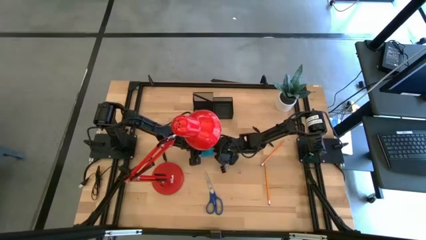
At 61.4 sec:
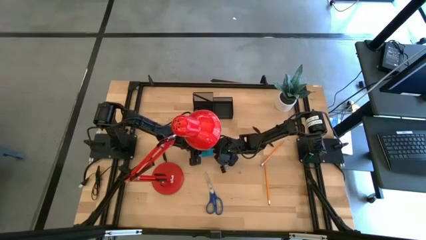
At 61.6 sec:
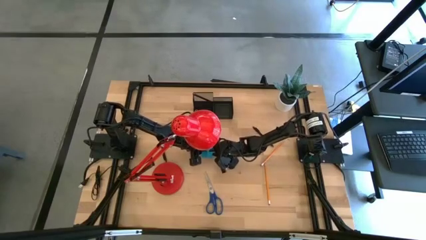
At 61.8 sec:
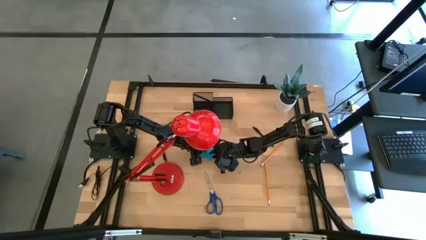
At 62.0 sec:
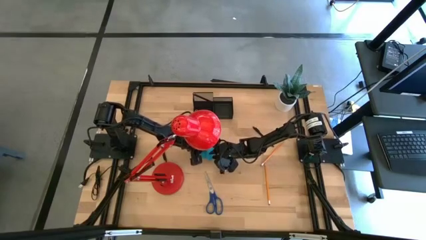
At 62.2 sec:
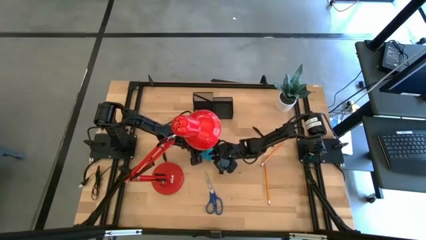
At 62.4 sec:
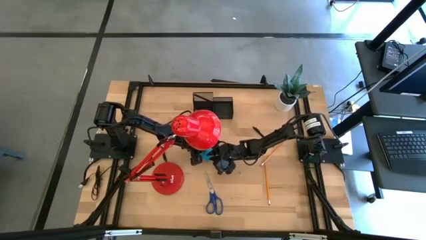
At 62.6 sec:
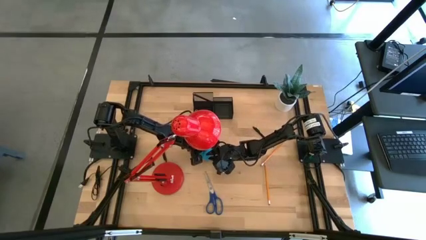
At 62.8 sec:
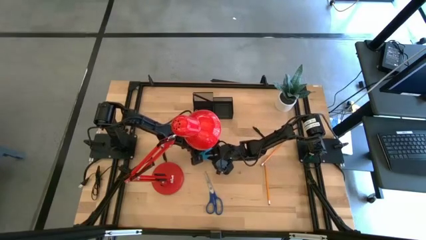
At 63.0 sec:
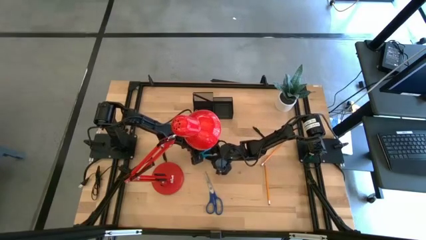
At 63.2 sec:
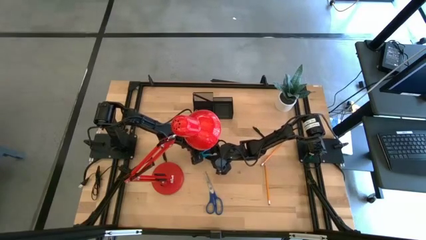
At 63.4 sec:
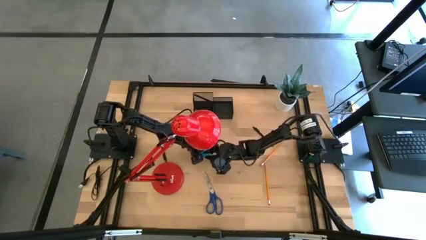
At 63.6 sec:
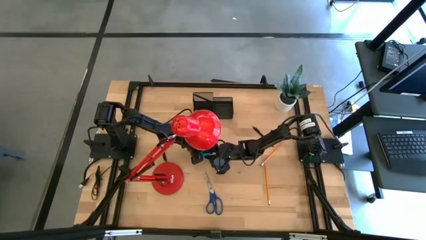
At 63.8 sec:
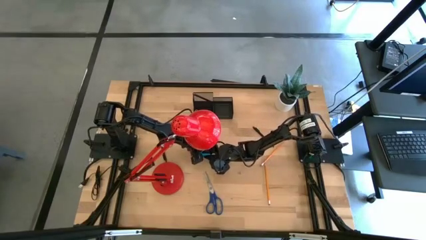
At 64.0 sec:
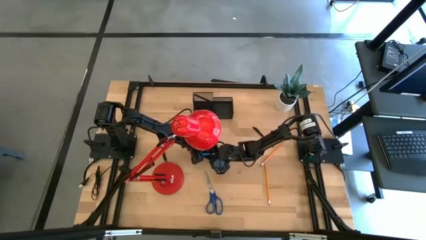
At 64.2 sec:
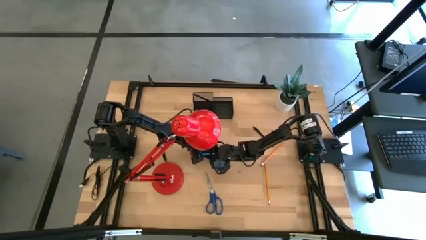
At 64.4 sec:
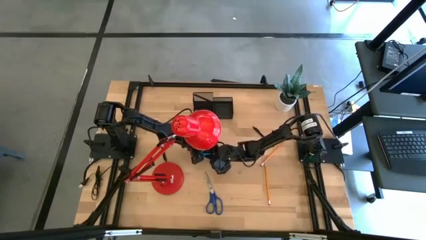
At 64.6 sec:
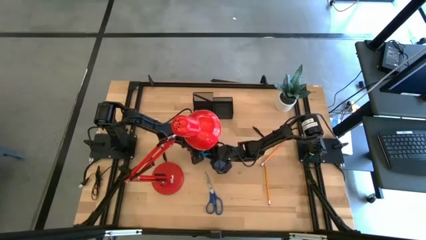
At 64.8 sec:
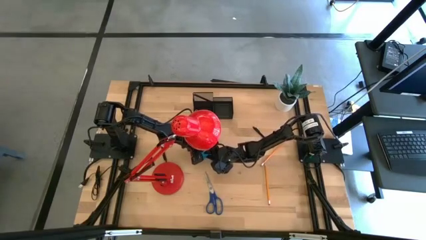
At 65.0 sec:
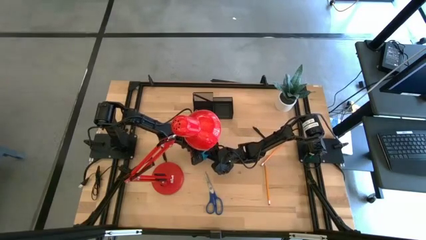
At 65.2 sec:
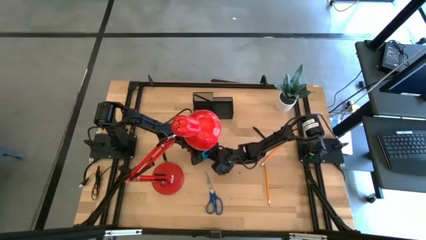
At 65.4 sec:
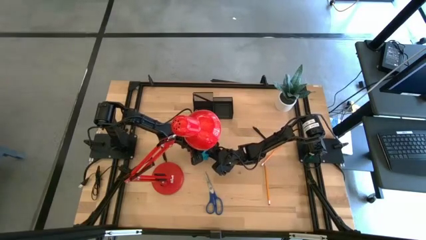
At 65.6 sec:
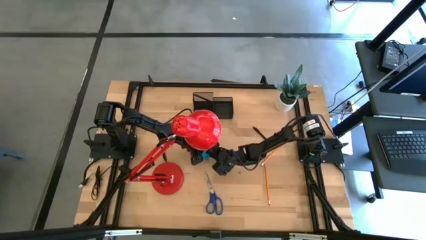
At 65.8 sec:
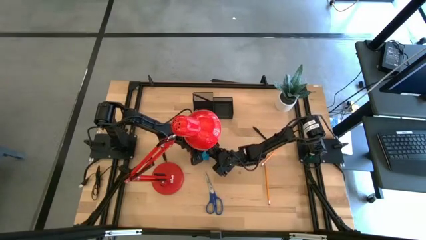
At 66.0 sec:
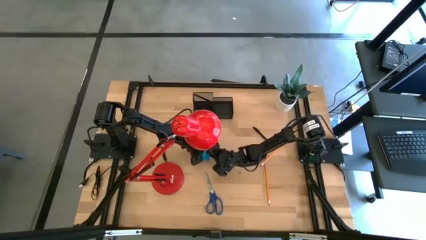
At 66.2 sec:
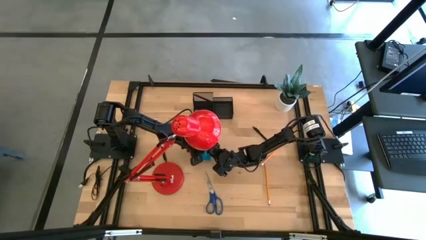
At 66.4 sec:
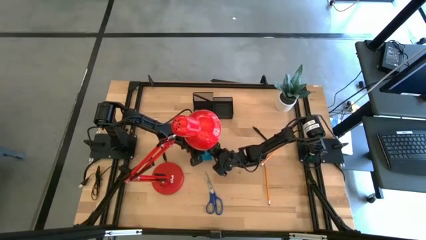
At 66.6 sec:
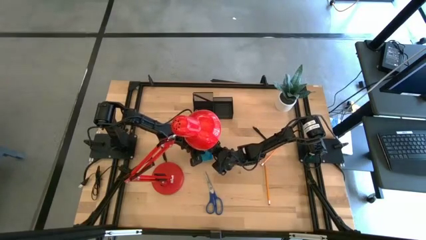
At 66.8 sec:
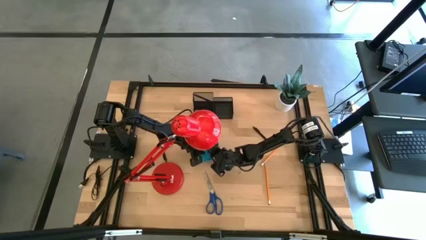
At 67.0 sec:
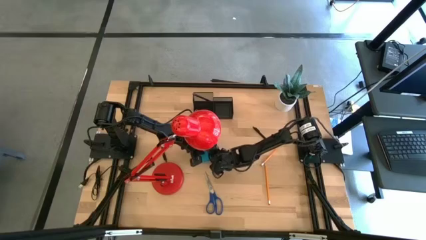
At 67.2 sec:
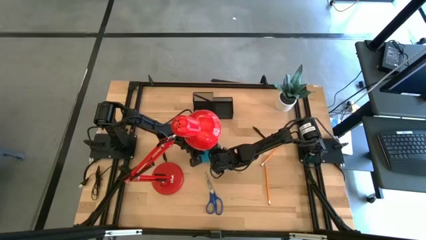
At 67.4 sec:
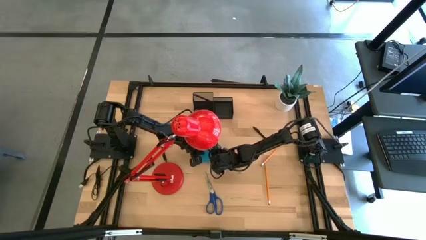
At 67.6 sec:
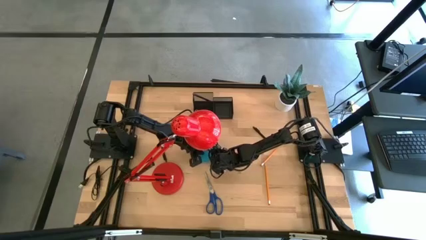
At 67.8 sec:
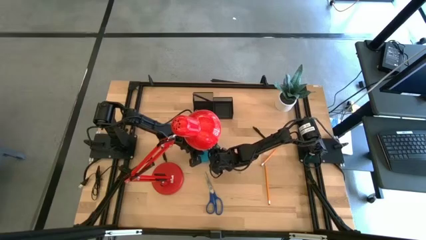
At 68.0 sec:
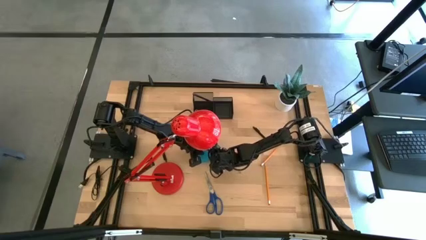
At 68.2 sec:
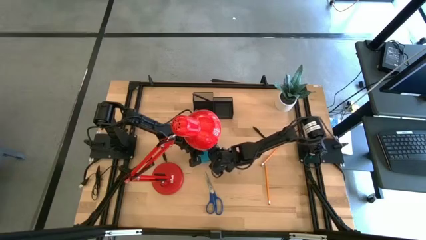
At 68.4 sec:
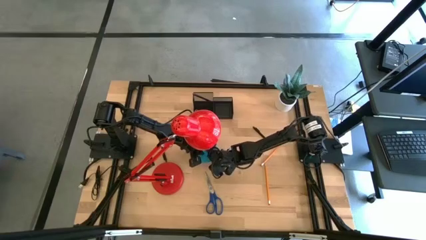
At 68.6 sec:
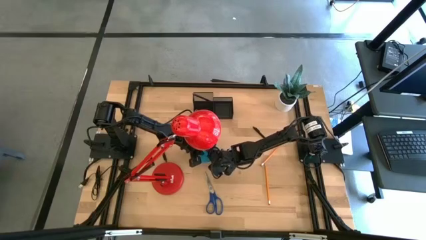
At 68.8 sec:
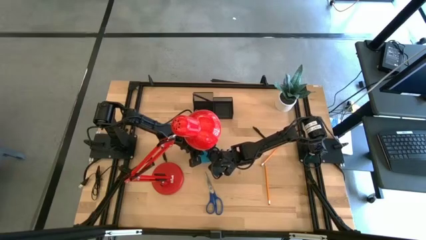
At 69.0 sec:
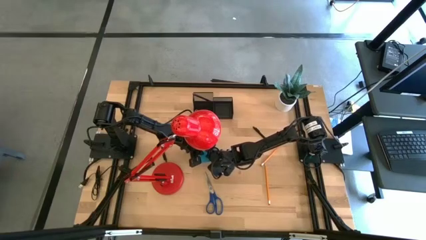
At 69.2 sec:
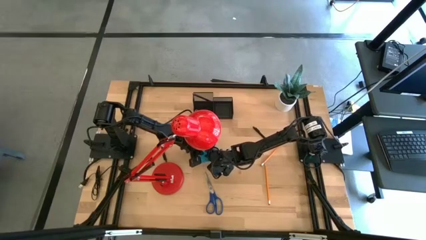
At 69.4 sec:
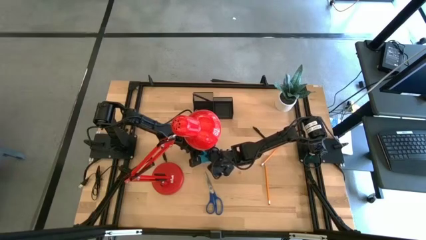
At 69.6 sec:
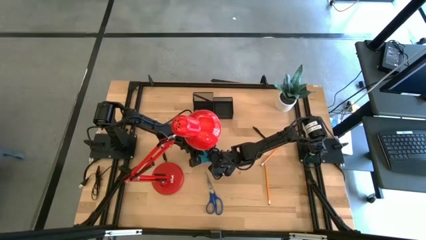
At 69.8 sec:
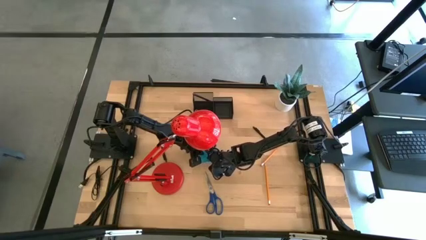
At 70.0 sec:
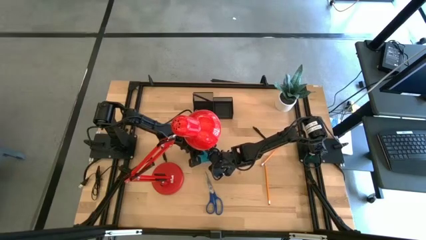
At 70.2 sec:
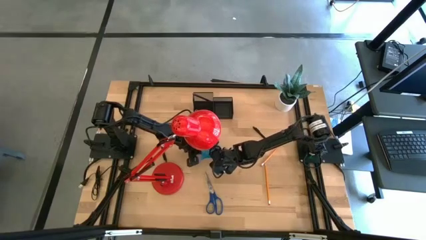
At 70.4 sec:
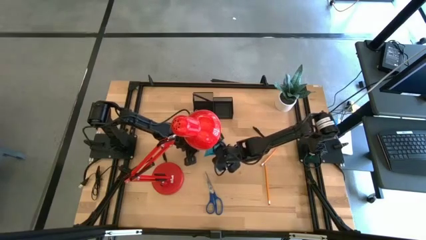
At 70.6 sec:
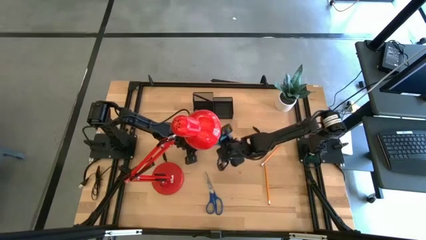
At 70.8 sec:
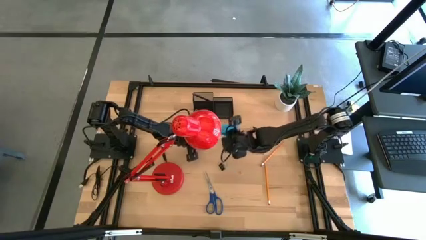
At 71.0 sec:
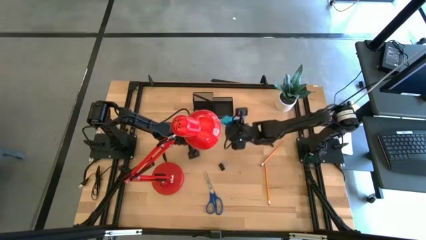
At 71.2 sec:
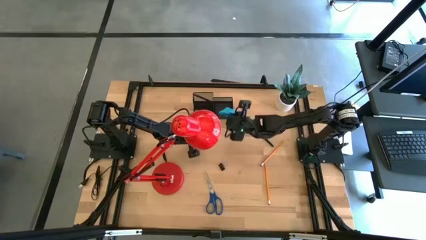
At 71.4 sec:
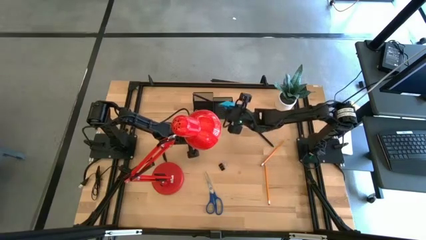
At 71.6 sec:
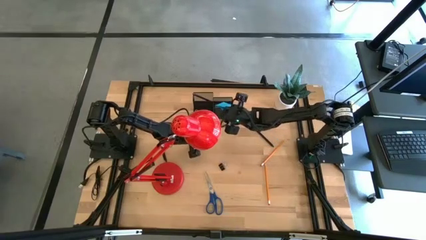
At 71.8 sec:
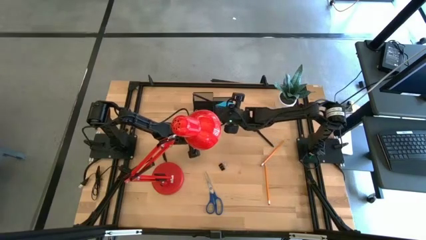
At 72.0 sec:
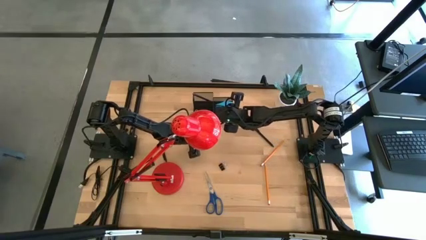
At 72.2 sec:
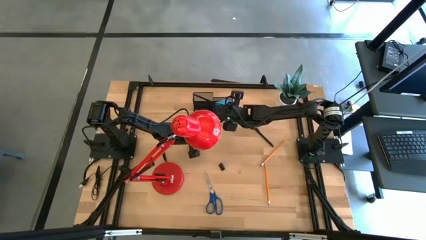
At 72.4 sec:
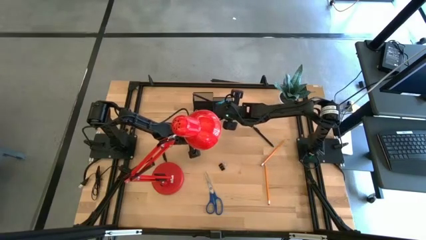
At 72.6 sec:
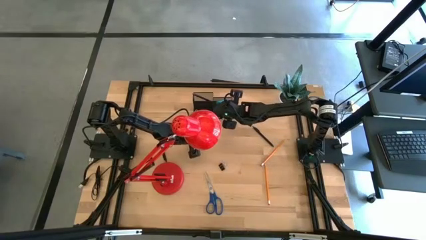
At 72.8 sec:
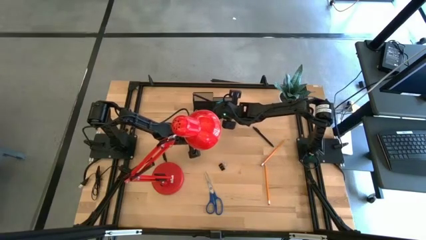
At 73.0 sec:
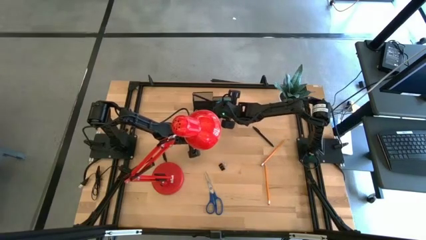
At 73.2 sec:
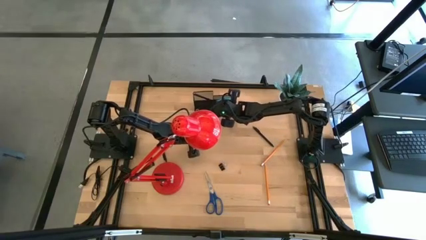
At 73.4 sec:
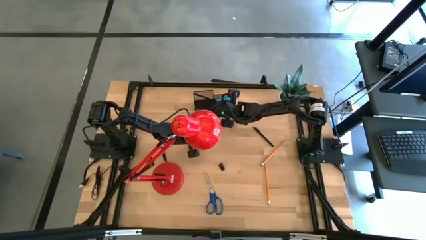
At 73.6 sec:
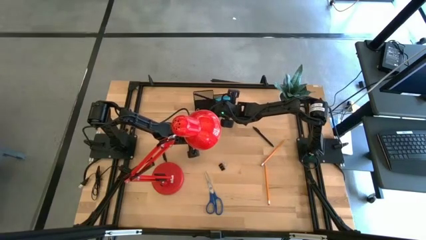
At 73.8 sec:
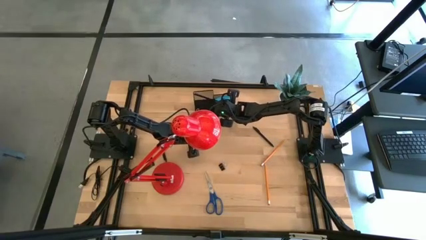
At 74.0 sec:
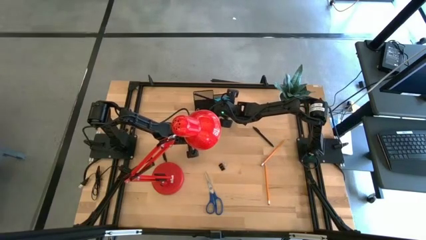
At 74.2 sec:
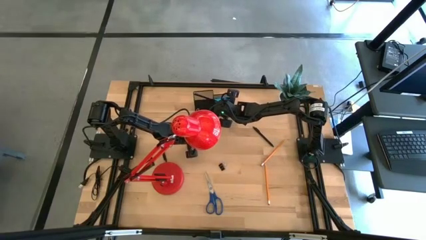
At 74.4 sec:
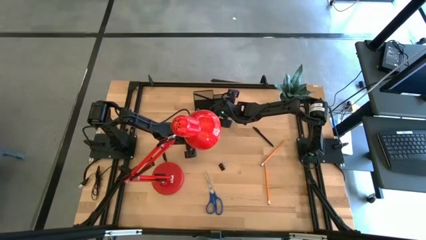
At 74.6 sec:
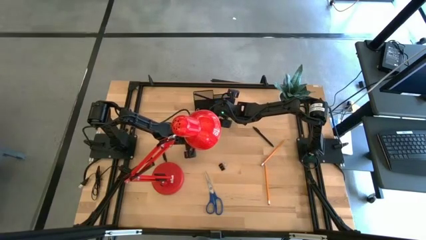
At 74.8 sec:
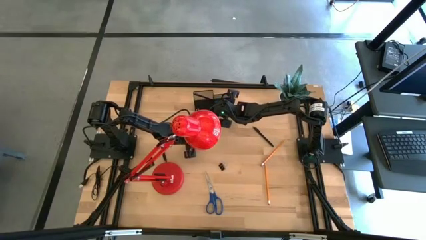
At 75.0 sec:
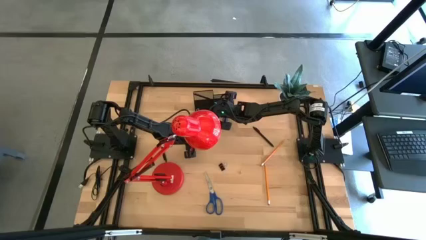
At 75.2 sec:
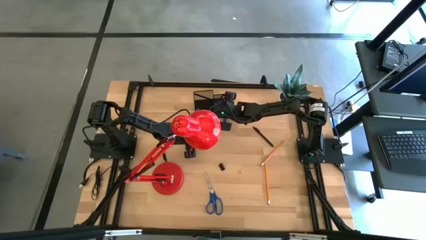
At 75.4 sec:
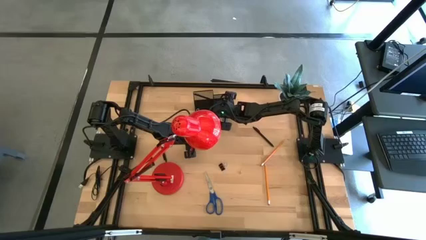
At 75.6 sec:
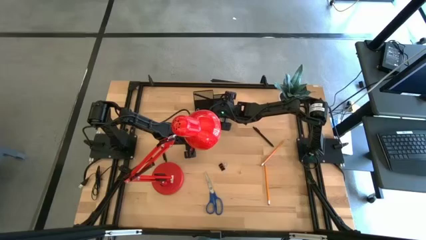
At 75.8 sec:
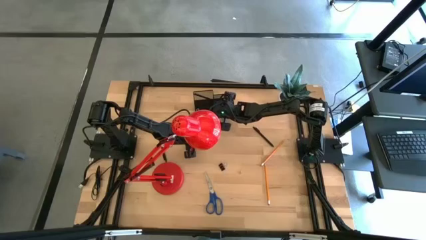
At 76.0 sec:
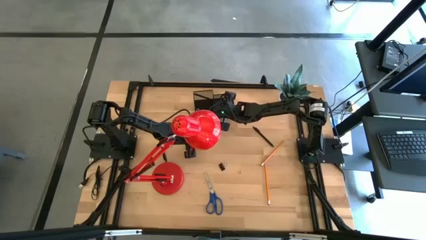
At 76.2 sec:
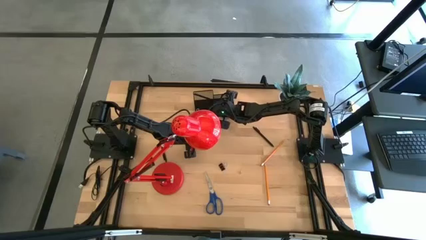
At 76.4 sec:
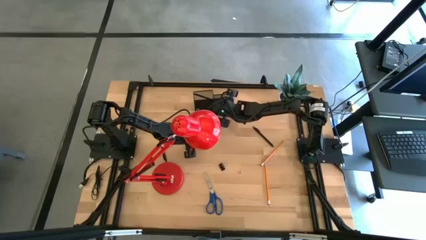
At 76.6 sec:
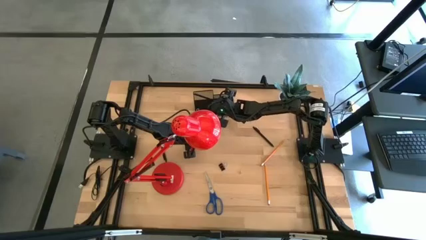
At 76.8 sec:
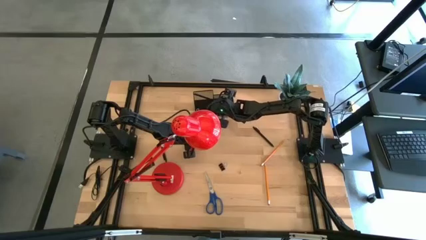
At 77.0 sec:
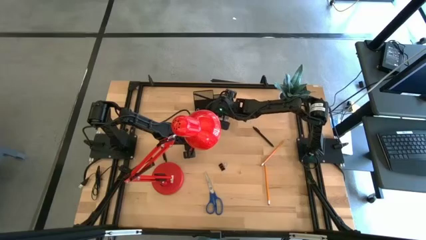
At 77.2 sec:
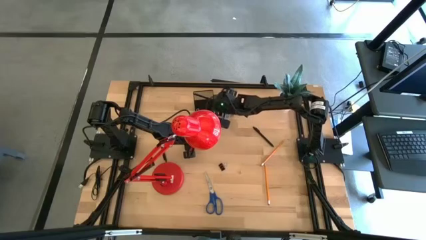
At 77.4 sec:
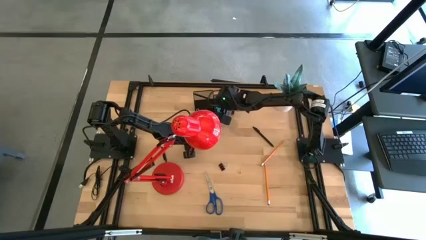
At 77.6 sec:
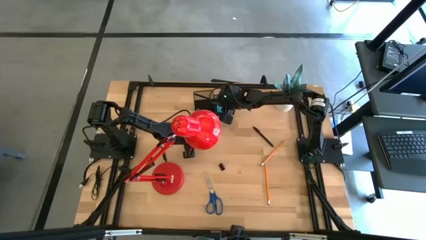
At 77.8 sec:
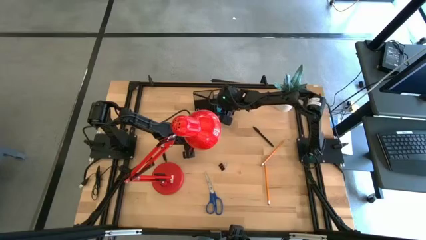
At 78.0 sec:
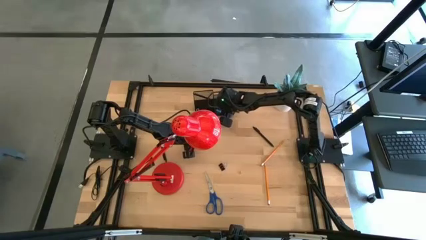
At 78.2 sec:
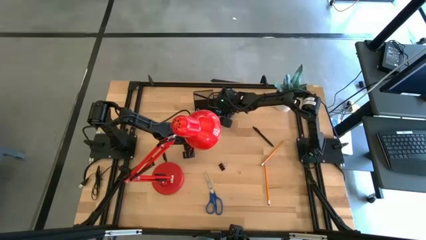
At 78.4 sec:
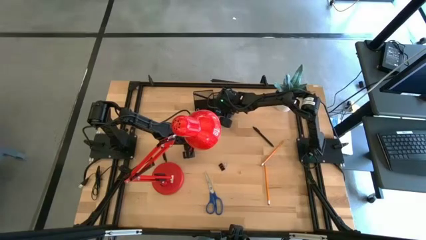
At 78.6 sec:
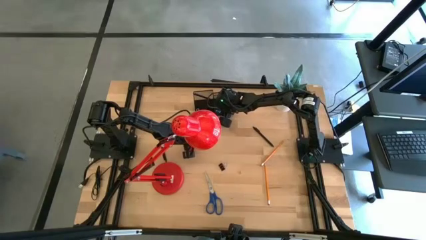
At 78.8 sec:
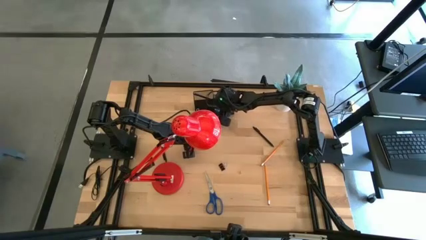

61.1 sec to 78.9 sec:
Task: Pick and place office supplies into organizer
Put the sticky notes into the desk organizer
